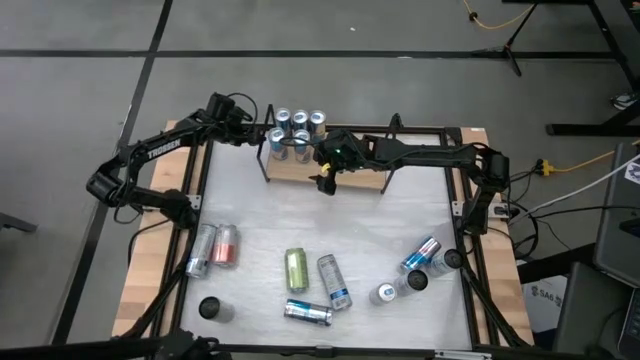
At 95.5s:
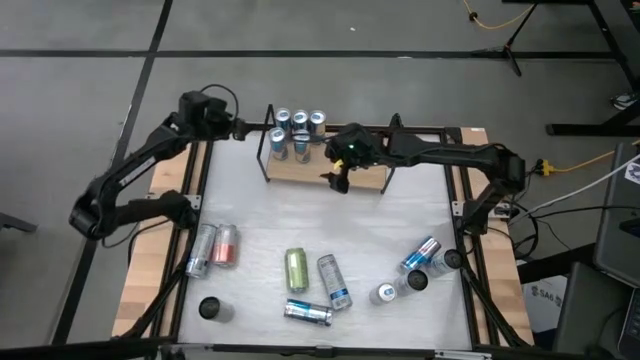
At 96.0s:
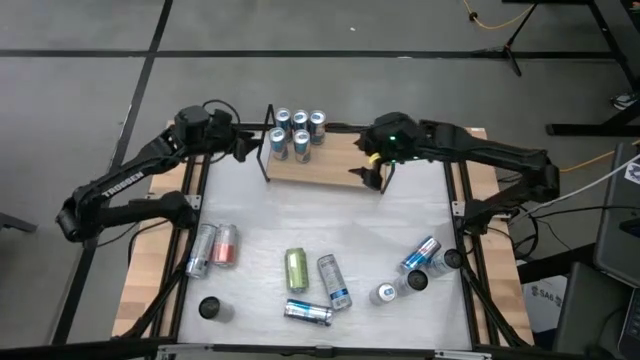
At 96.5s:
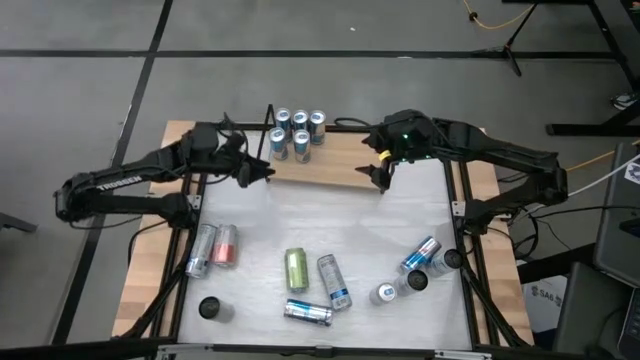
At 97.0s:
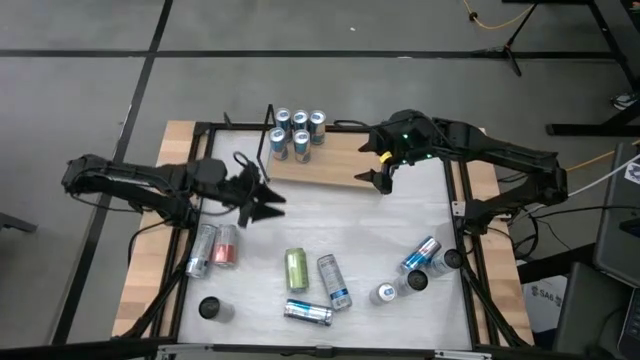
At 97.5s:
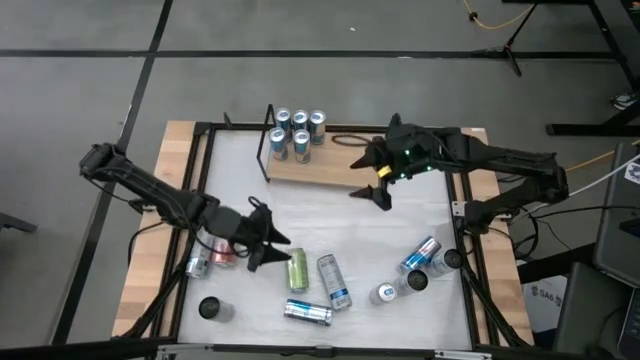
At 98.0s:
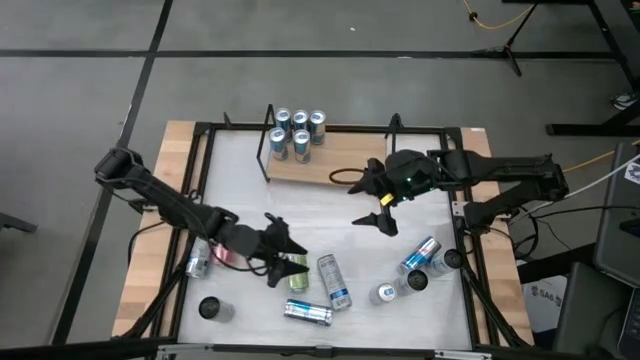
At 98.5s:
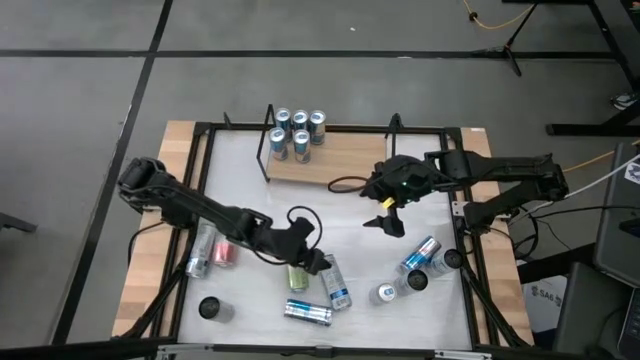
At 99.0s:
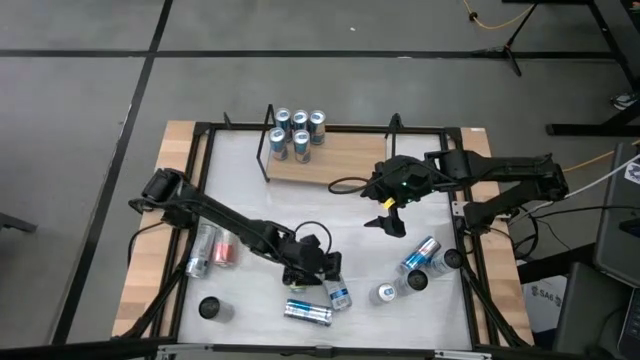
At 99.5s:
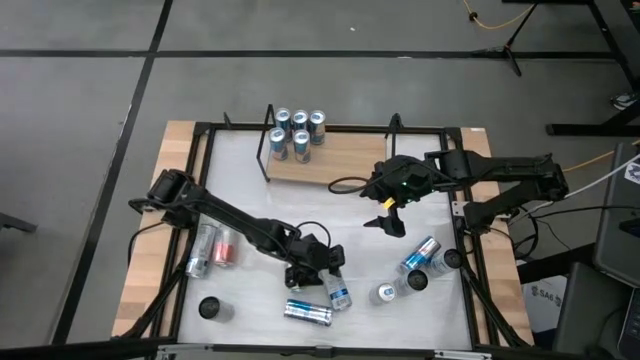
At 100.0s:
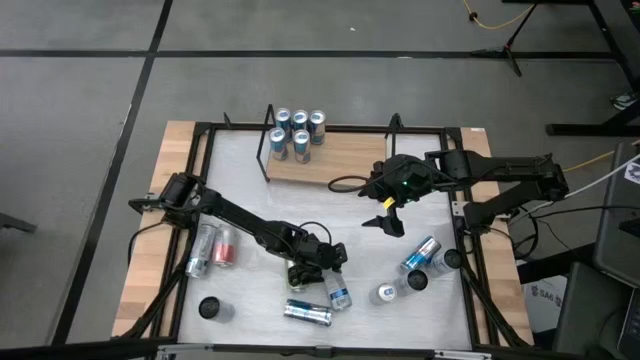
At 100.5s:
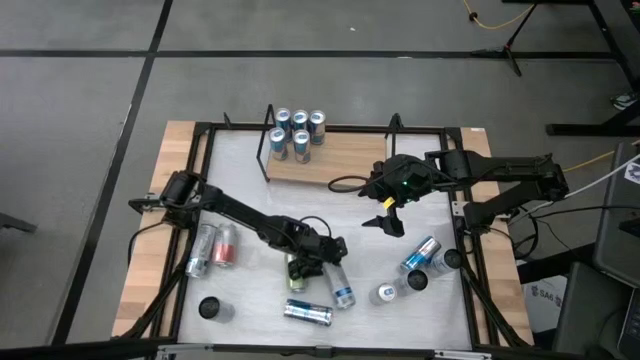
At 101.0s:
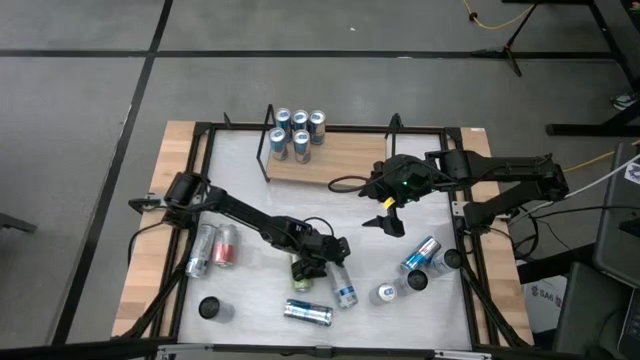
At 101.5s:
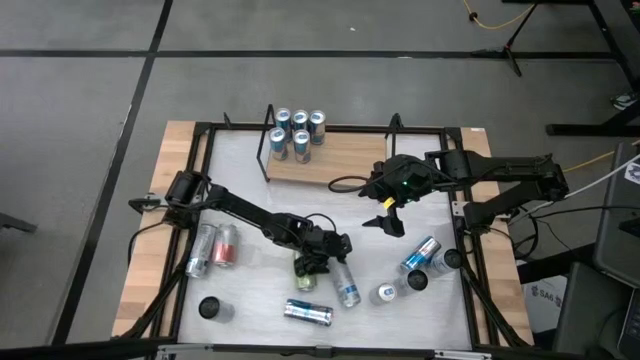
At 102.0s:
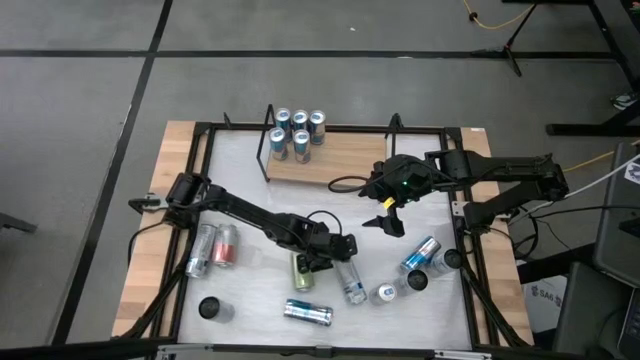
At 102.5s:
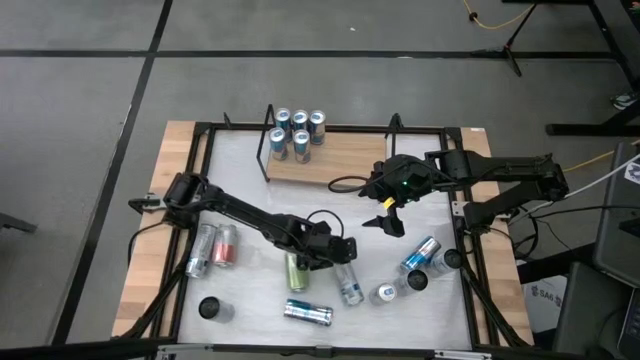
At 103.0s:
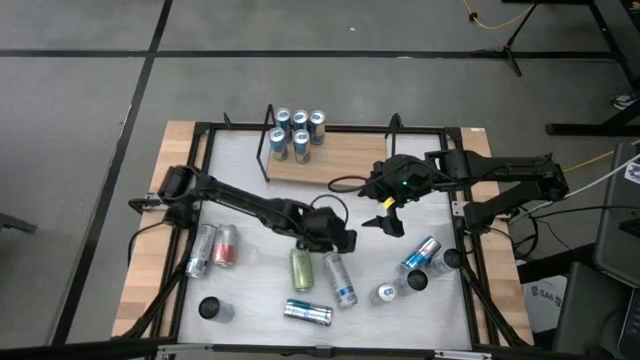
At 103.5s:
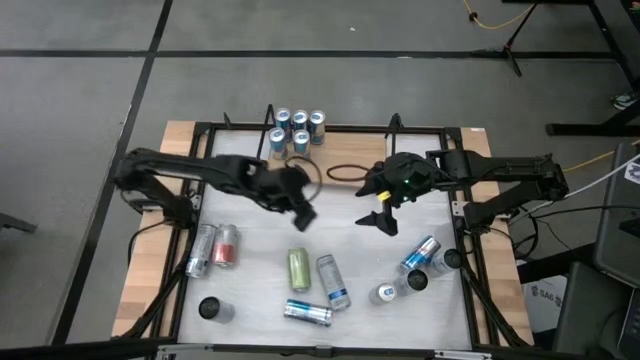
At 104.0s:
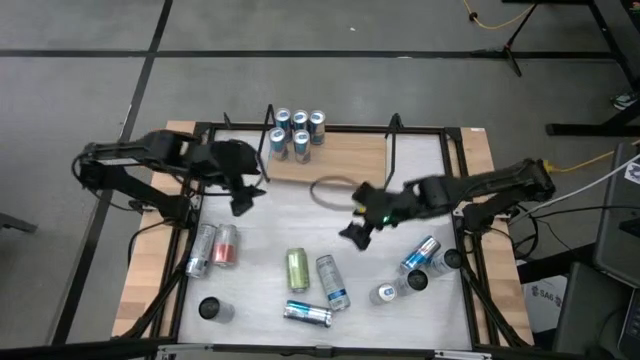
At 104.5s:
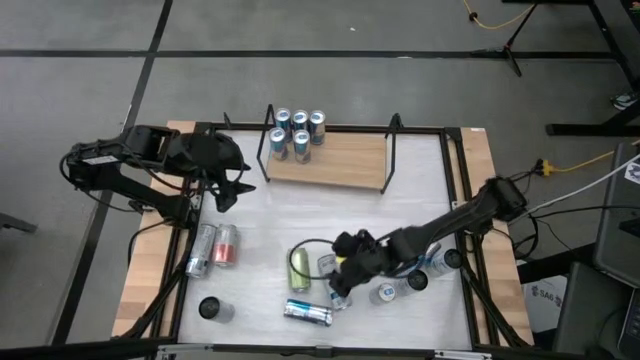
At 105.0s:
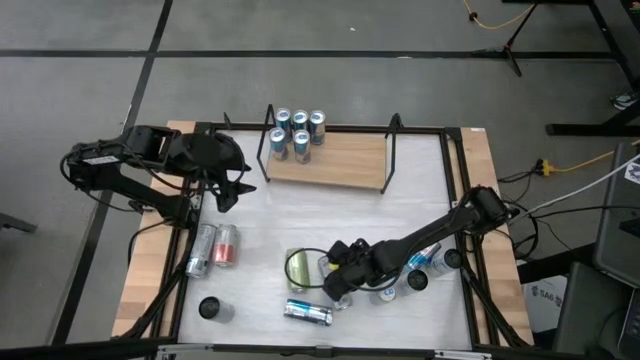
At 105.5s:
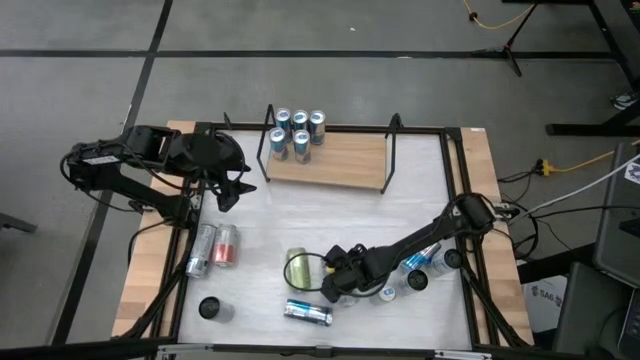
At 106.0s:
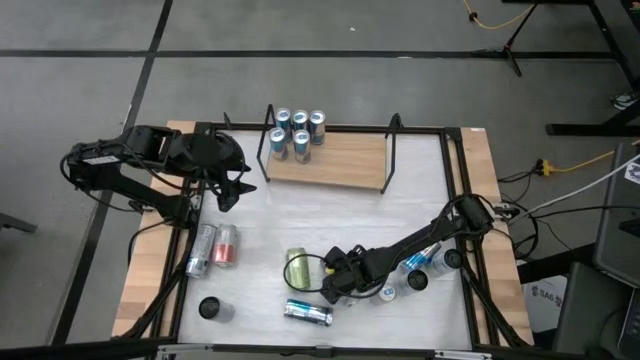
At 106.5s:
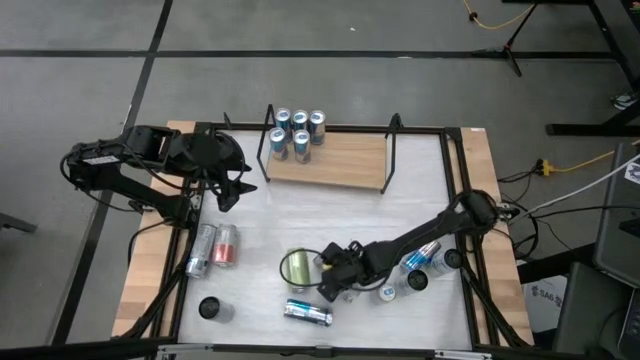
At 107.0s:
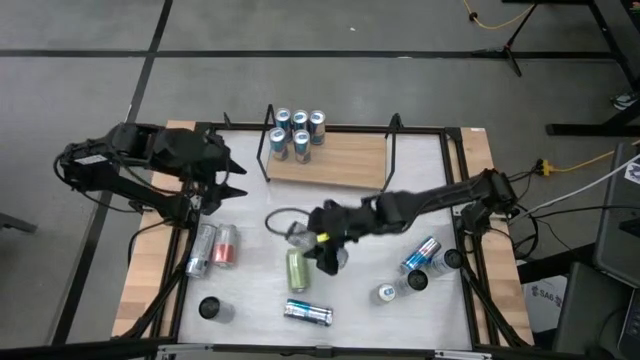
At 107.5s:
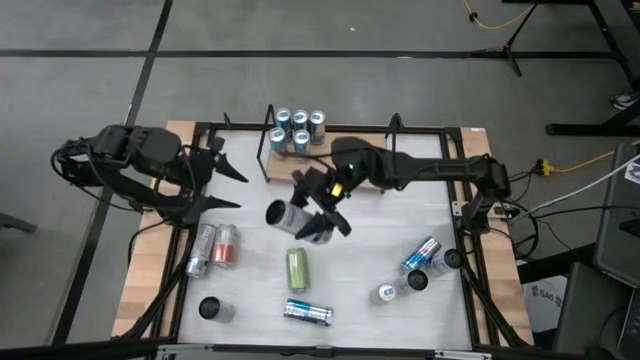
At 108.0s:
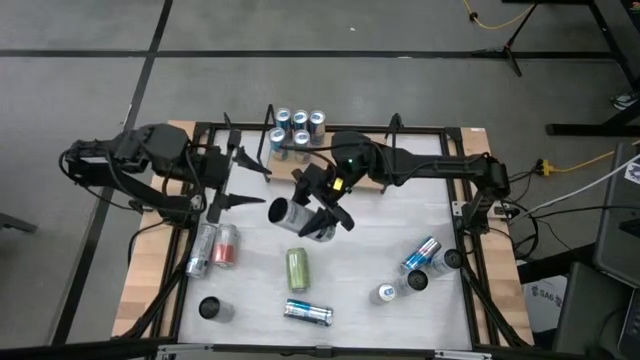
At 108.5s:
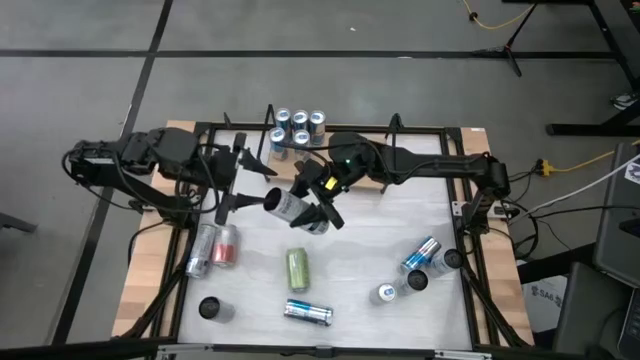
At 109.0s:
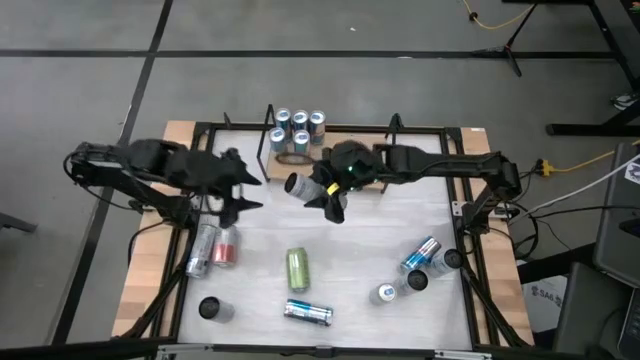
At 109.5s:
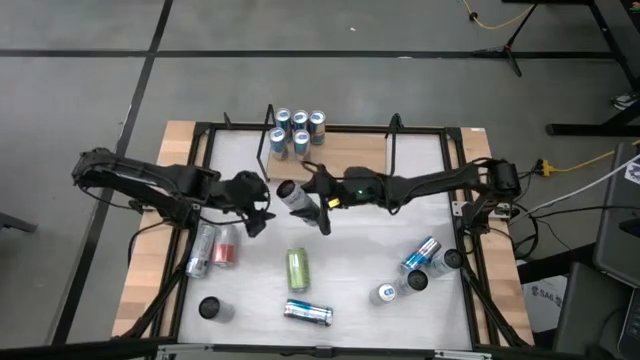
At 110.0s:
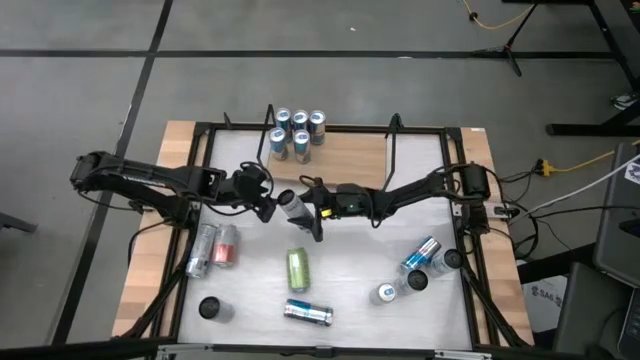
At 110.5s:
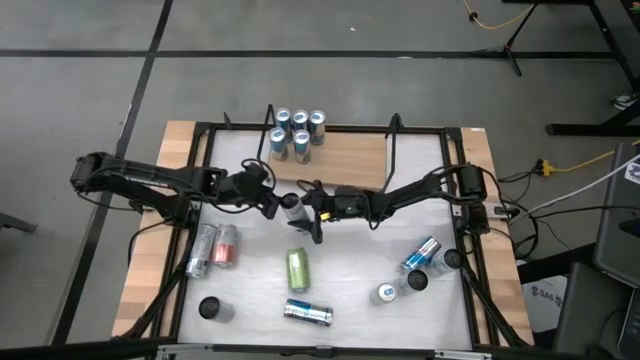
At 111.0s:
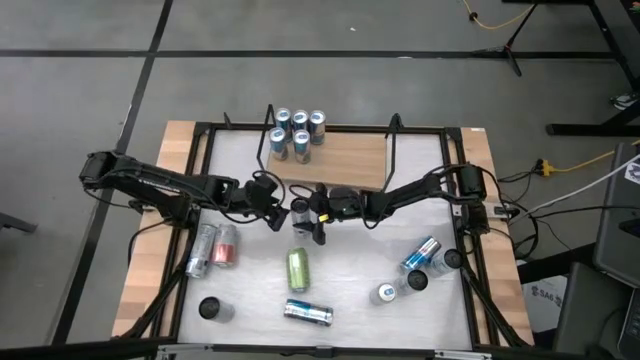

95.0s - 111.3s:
Task: Place canned beverage on shelf
Put the white blue soda can on the shelf

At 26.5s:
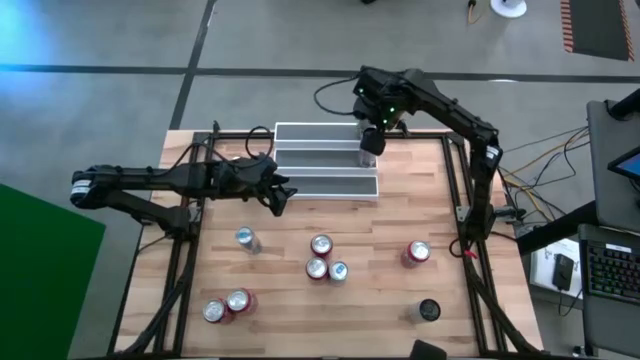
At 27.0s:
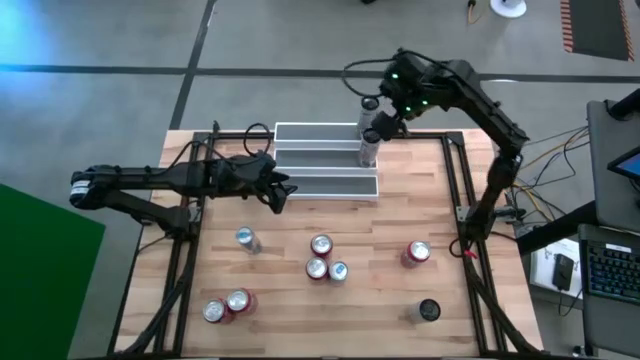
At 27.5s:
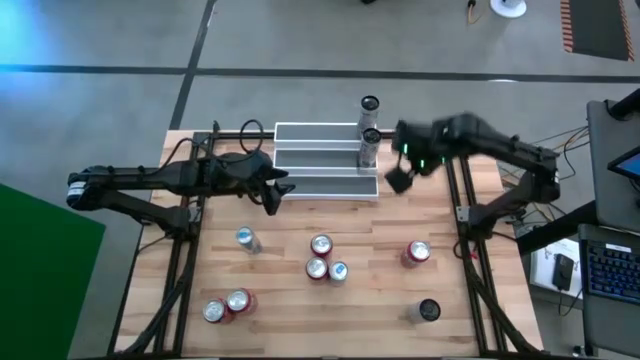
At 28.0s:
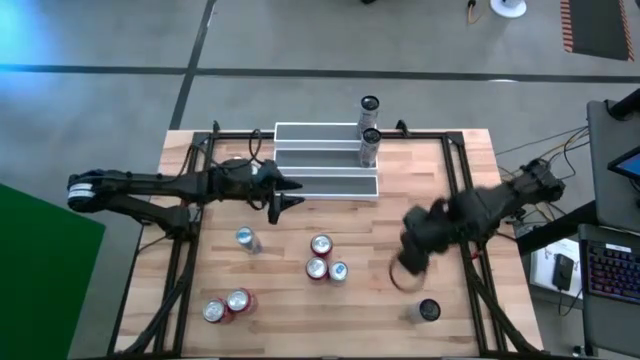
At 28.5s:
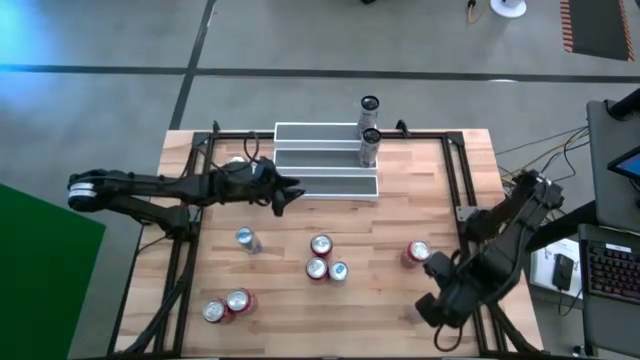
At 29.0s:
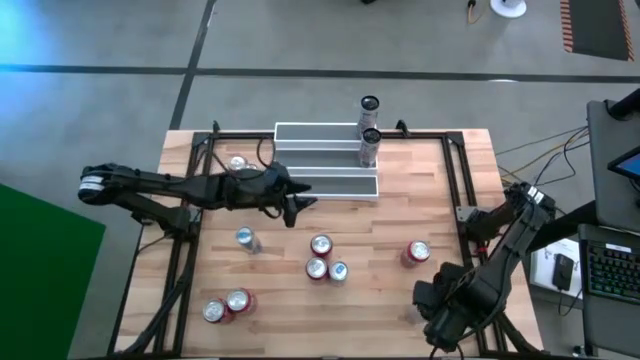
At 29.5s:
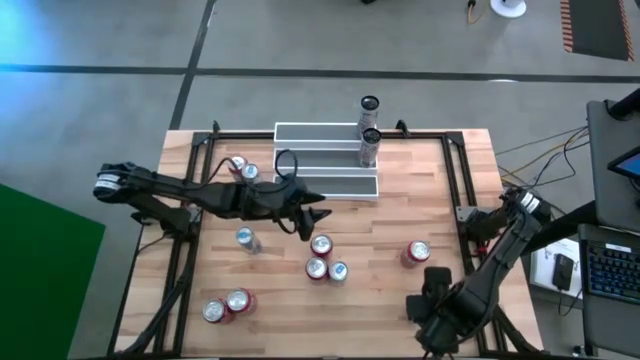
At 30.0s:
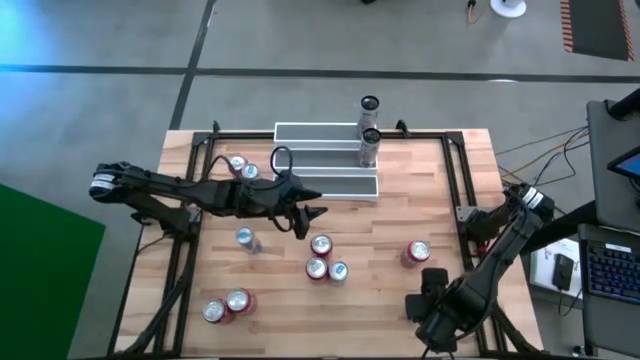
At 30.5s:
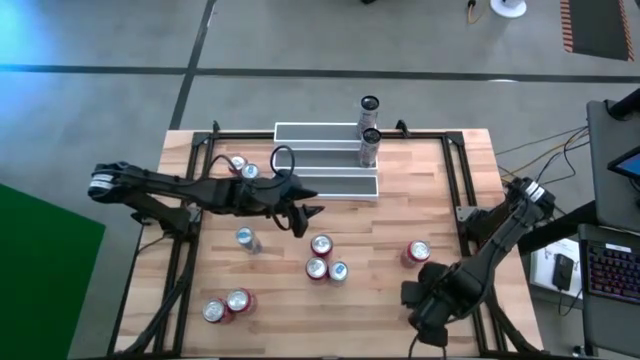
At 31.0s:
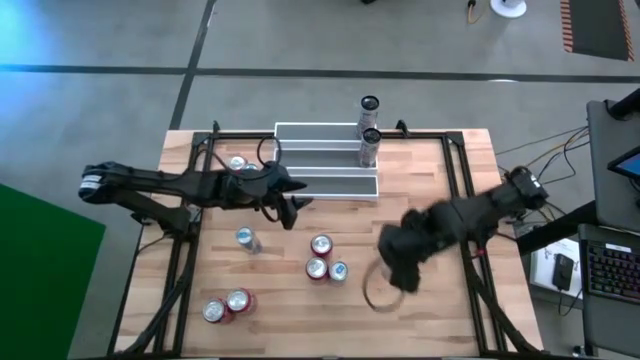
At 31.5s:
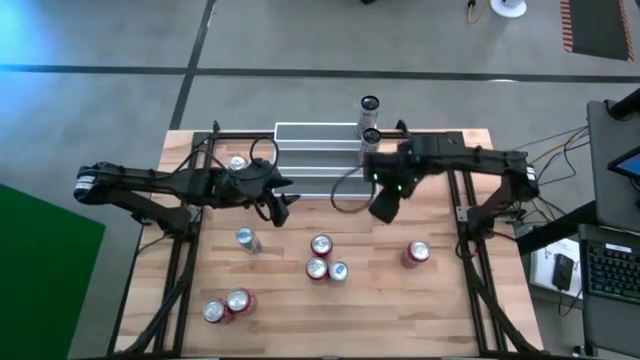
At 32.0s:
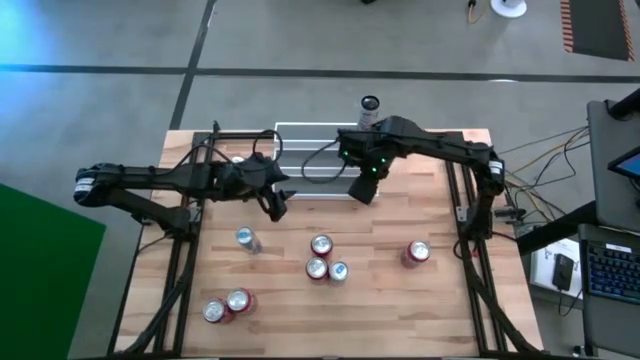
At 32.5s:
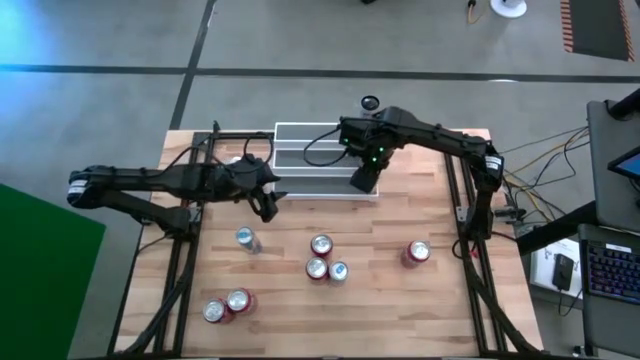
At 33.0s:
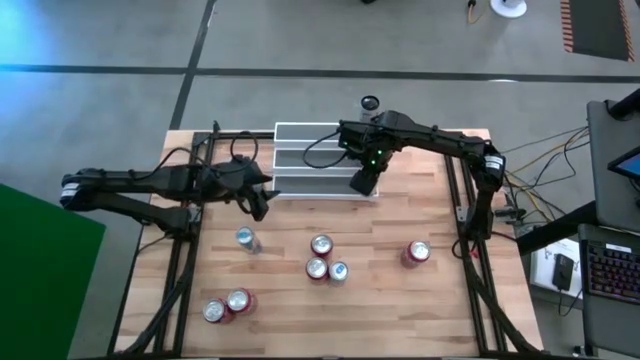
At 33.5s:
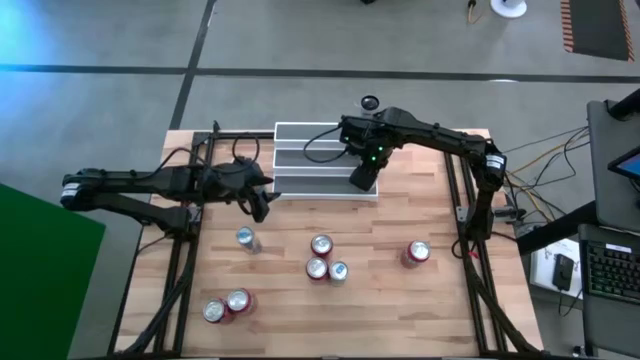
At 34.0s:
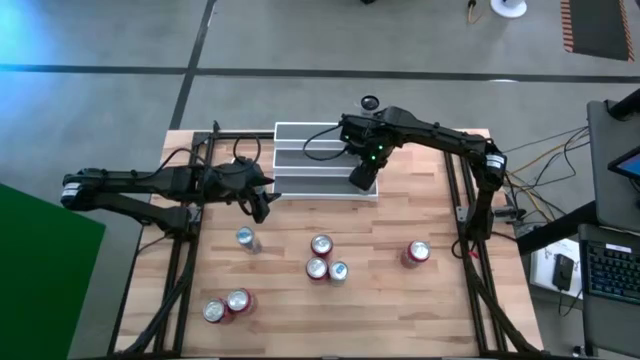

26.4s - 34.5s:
Task: Place canned beverage on shelf
Put the white soda can on the bottom tier of the shelf aligned with the other white soda can
